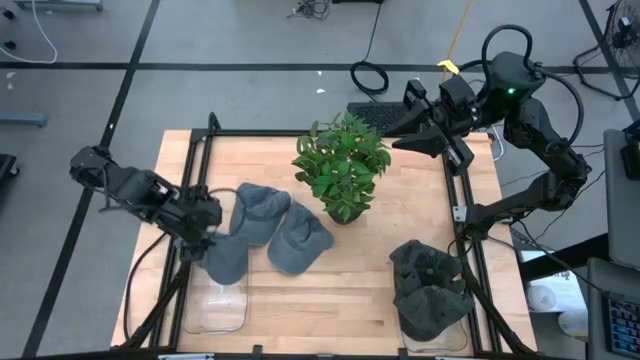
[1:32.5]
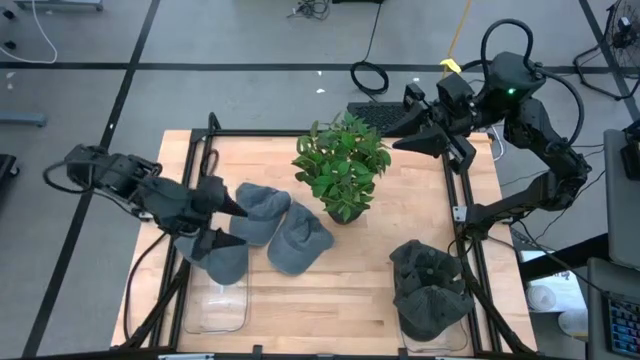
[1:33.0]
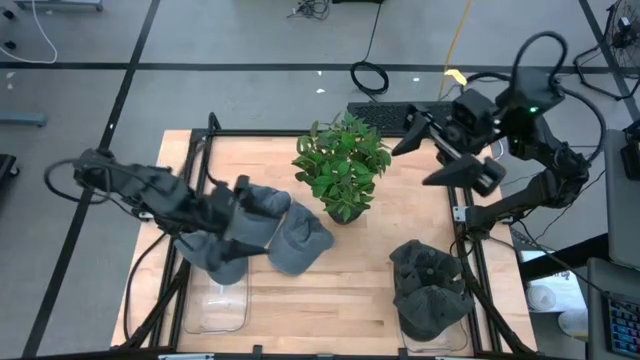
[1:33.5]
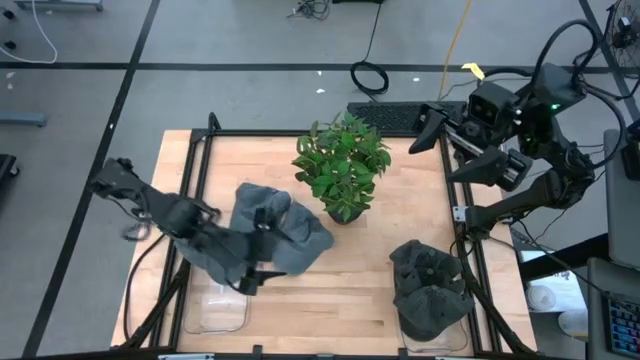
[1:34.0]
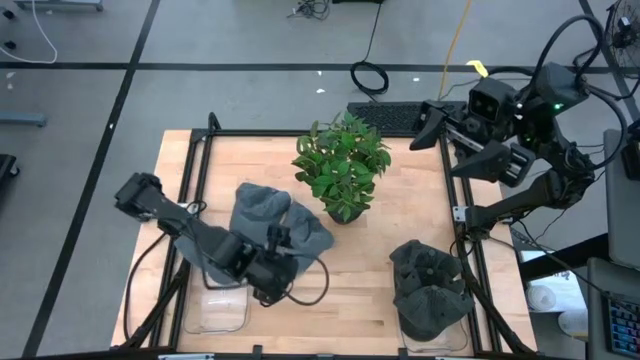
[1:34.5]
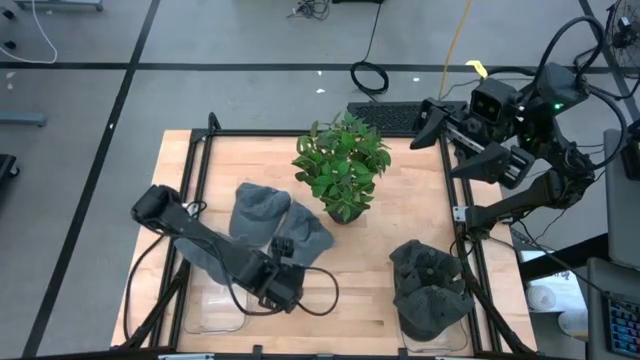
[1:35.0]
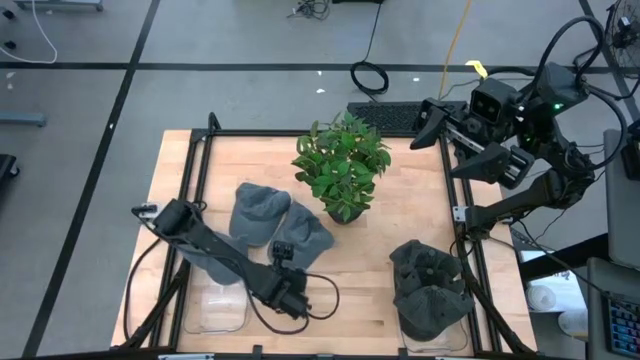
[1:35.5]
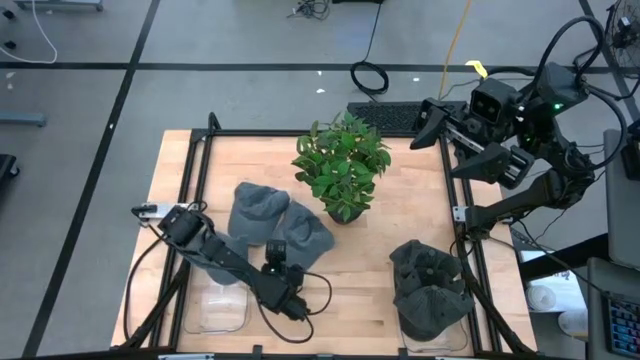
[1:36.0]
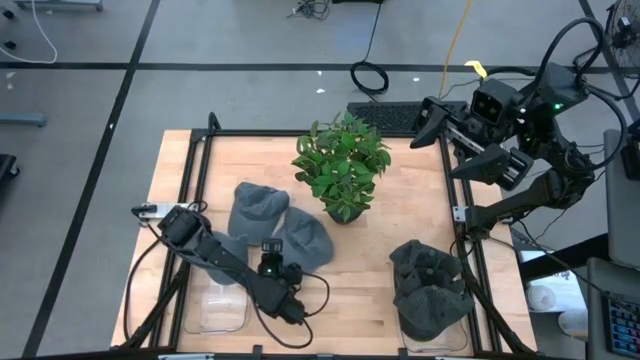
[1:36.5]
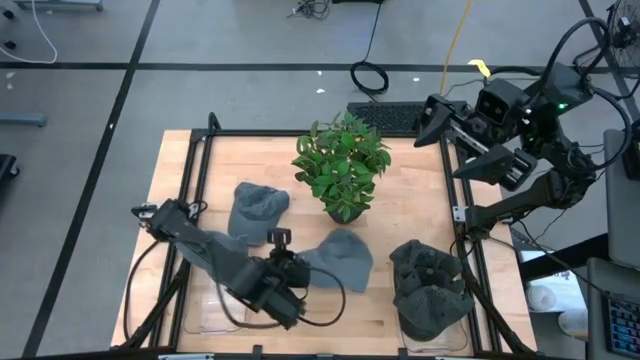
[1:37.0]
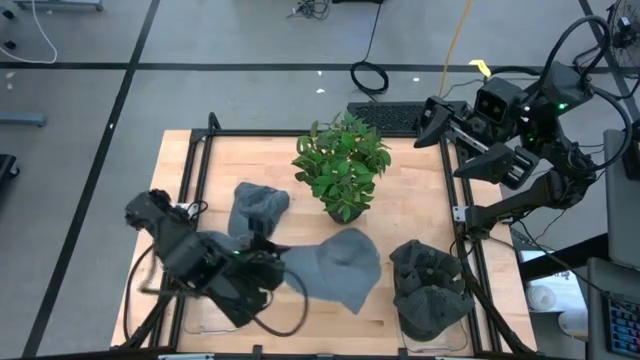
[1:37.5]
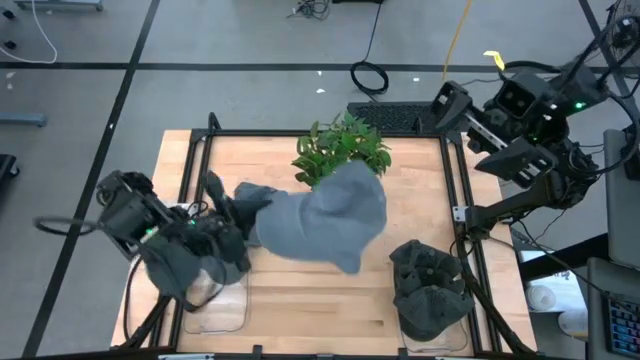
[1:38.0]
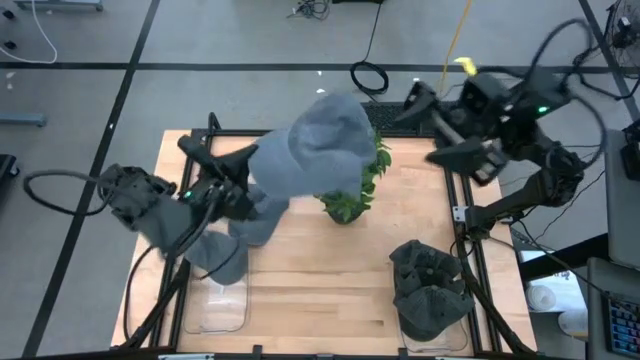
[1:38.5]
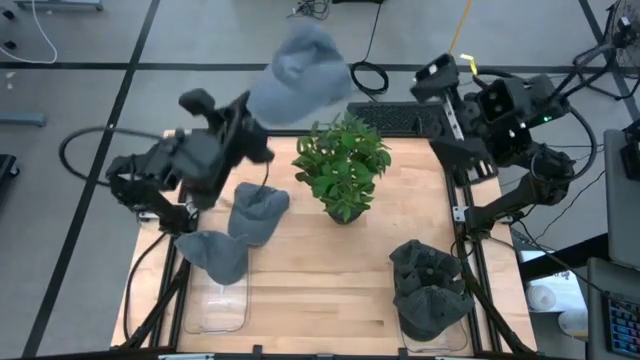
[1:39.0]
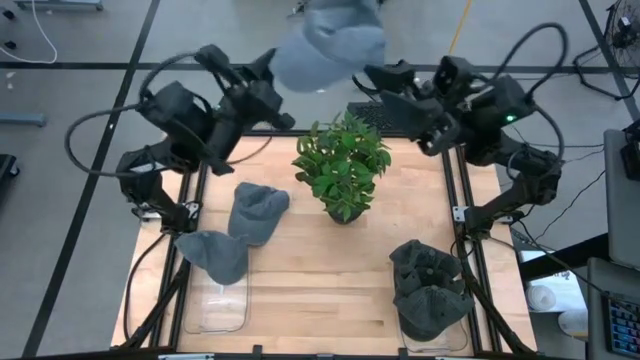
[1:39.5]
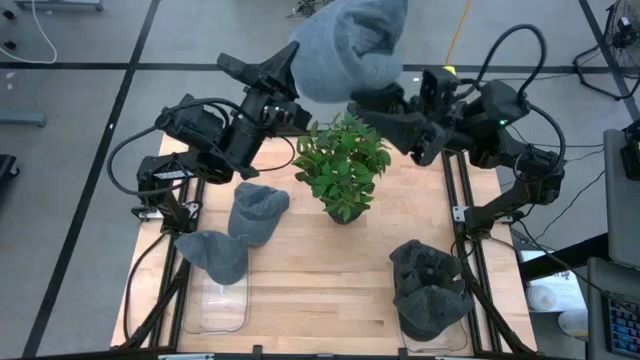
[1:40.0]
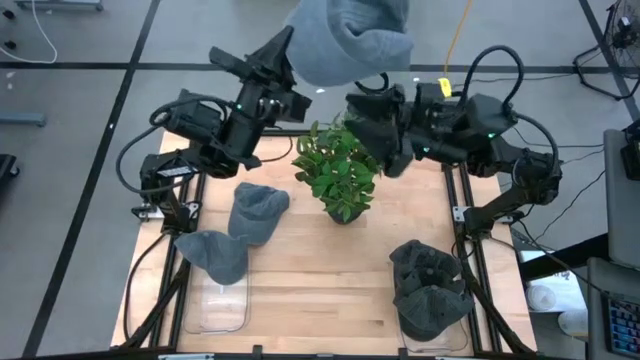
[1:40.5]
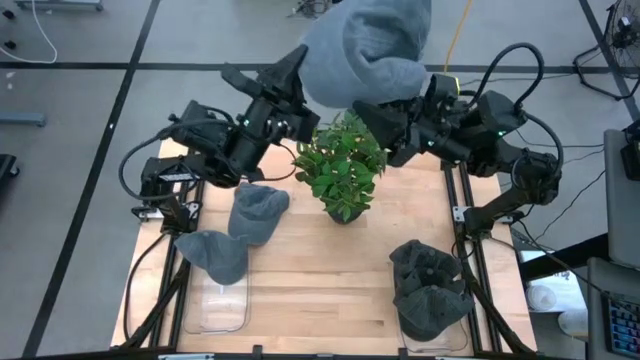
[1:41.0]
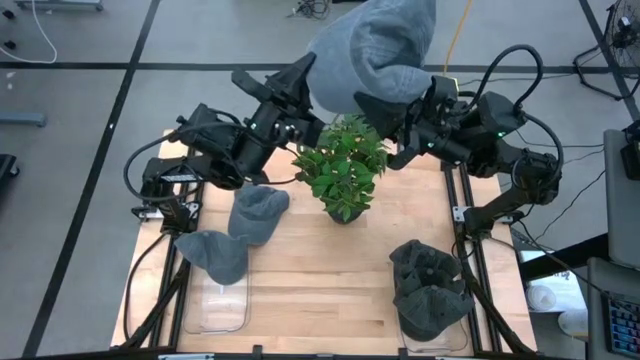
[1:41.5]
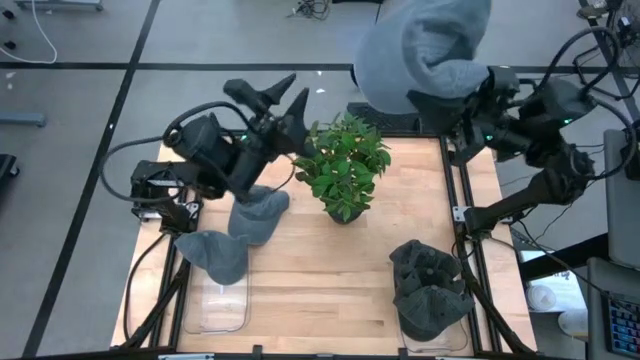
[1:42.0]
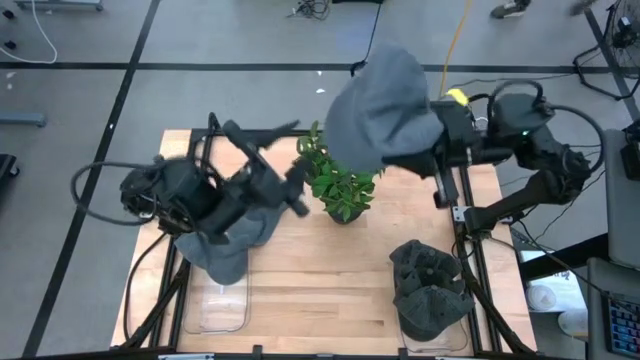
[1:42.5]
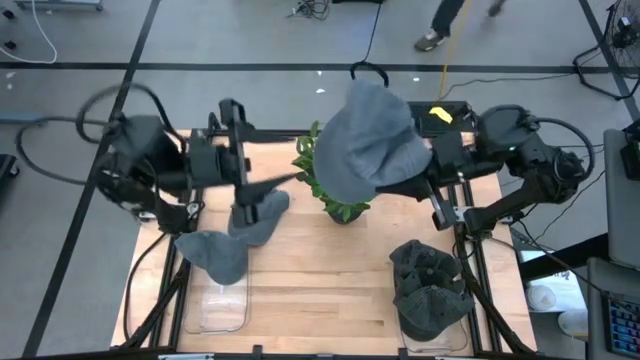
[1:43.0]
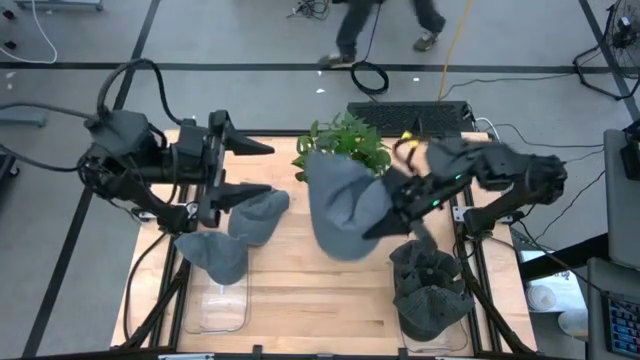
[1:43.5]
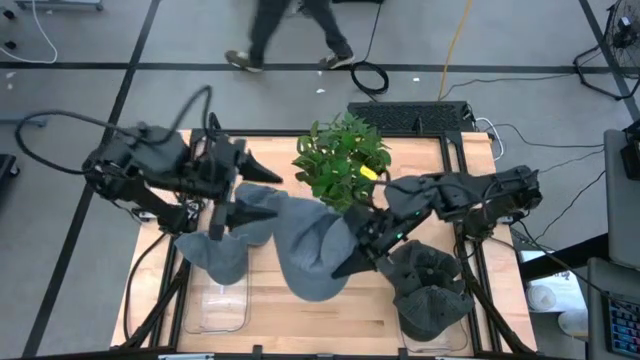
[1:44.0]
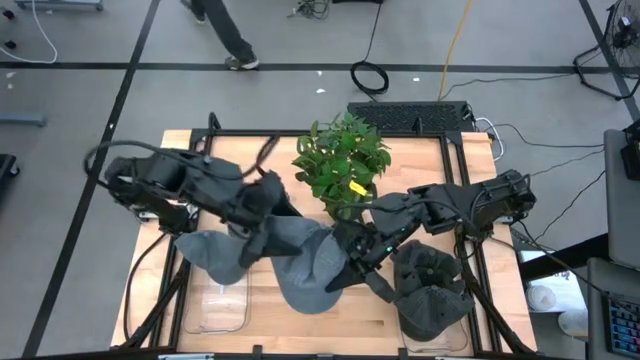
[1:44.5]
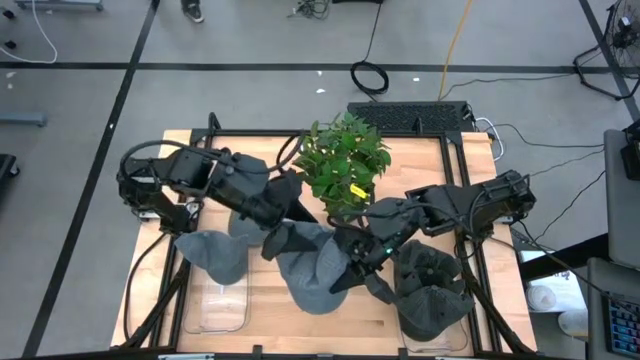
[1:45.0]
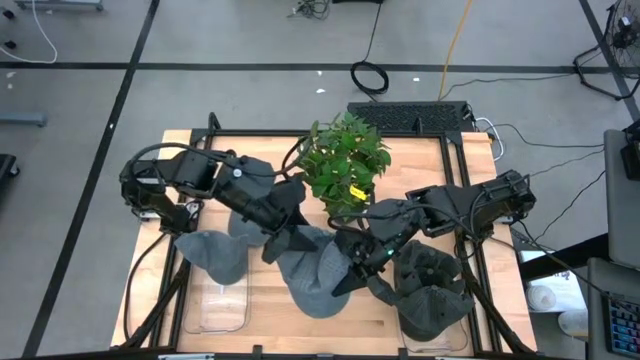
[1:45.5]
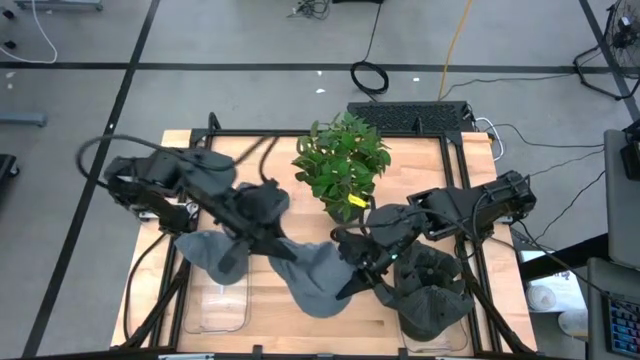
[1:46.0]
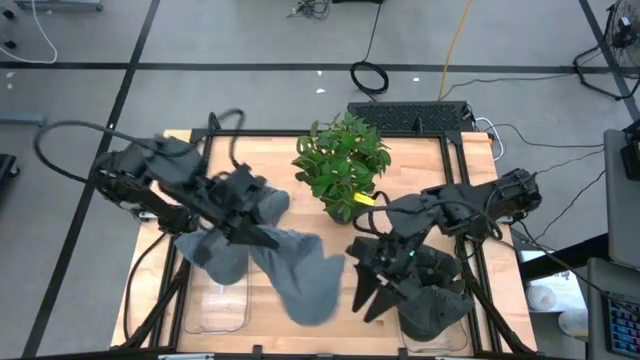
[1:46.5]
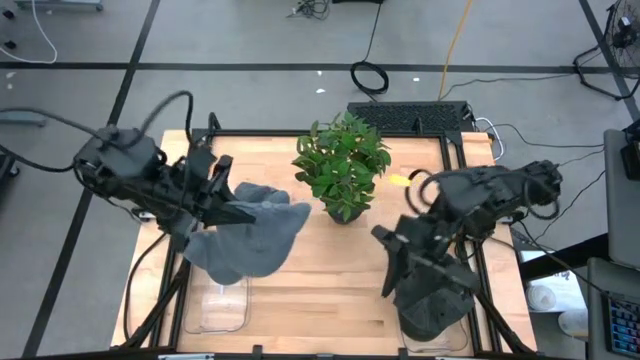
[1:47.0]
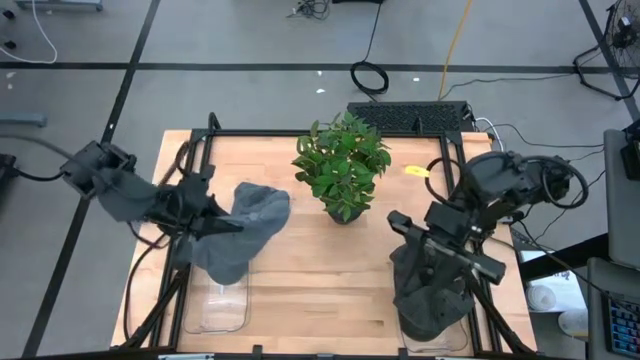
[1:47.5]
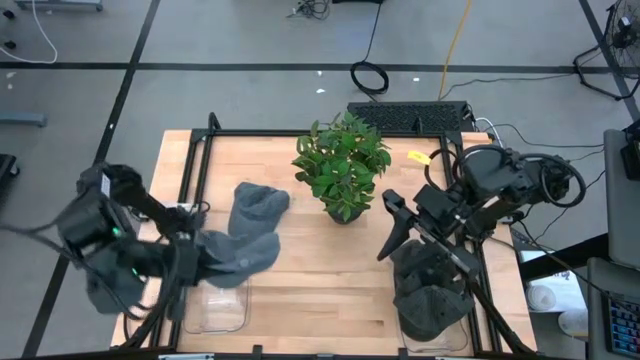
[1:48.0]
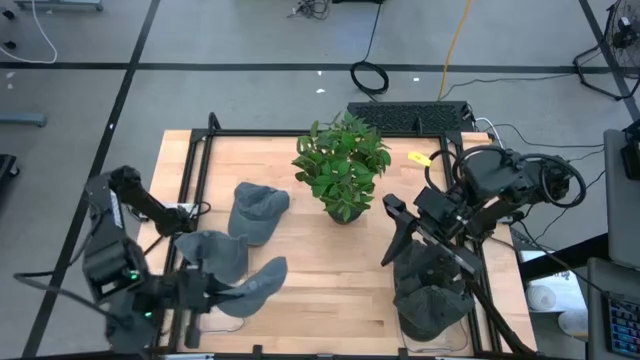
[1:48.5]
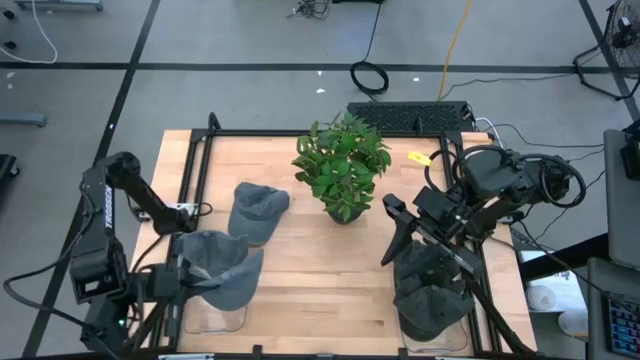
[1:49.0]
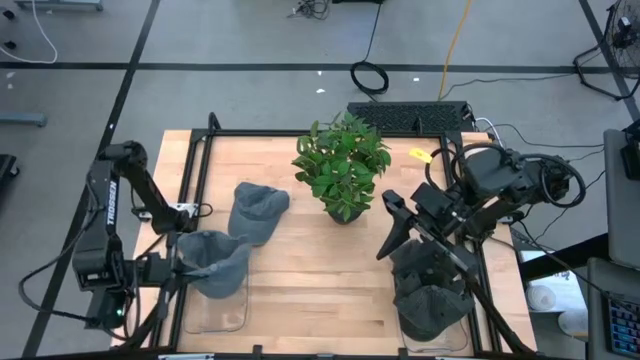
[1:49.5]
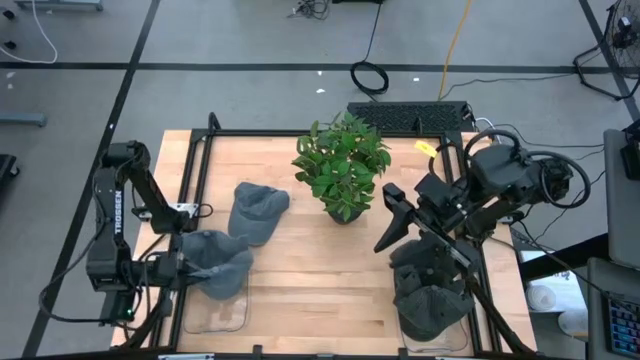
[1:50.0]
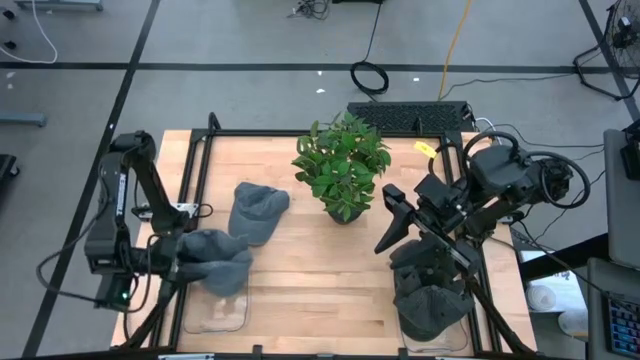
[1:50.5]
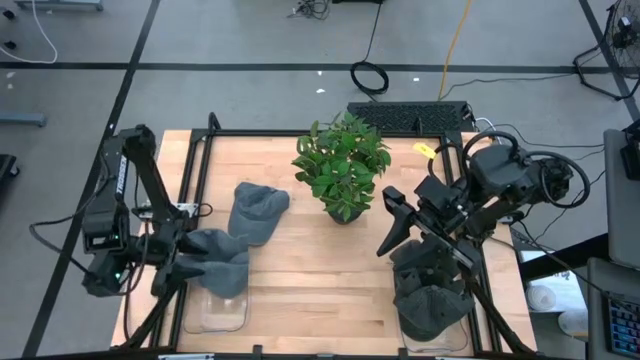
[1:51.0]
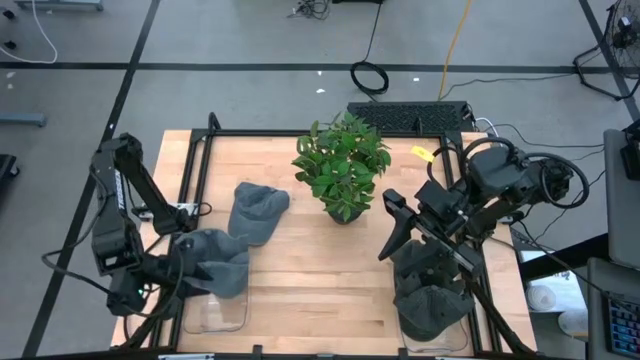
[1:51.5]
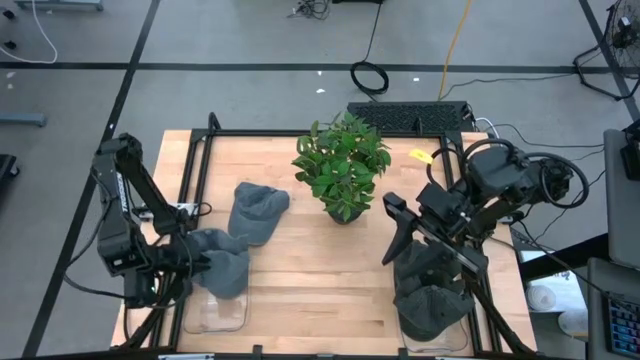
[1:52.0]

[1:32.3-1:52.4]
Task: Pick & Place hat
Put the right blue cap into the left transparent bin

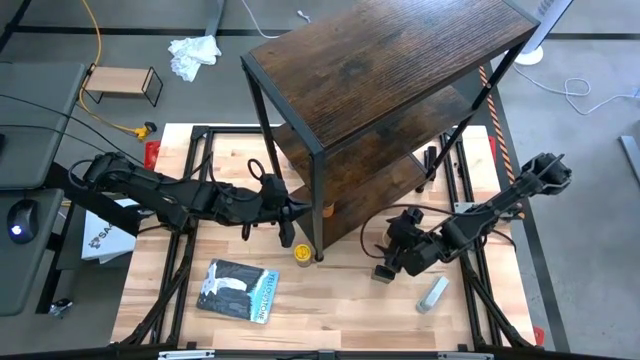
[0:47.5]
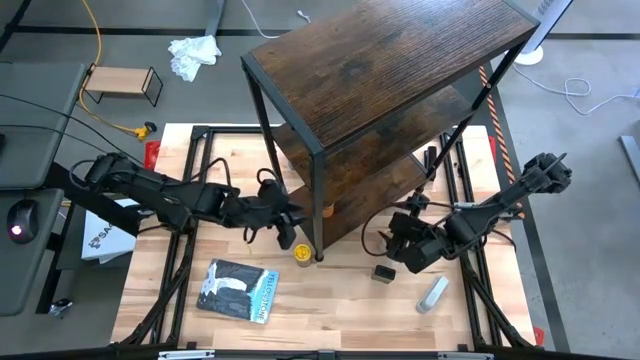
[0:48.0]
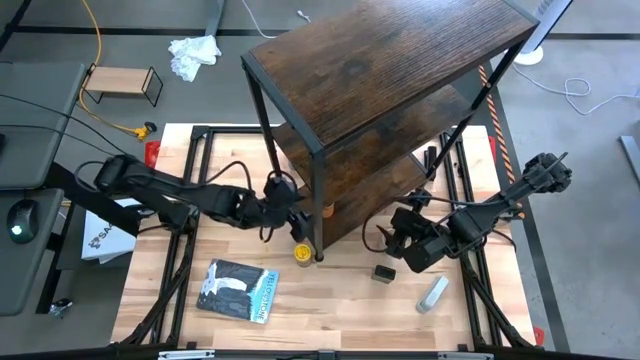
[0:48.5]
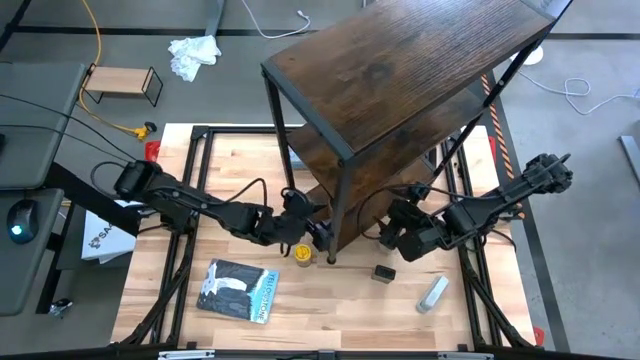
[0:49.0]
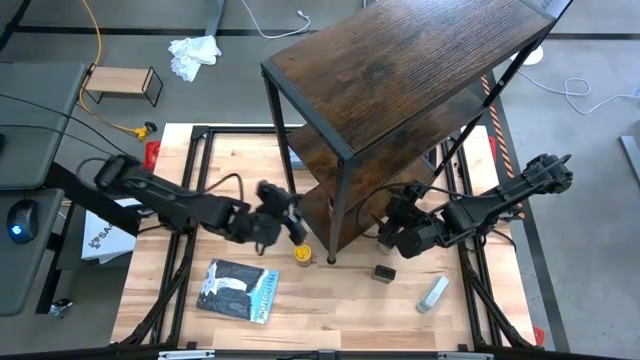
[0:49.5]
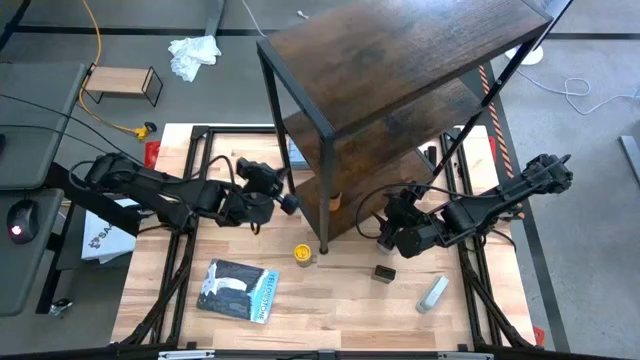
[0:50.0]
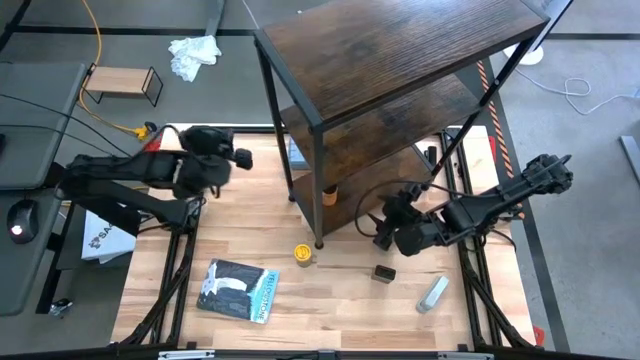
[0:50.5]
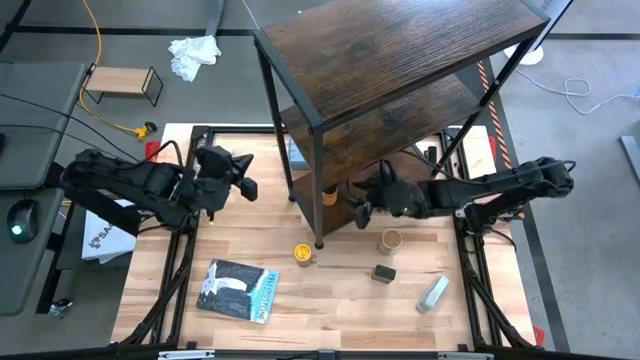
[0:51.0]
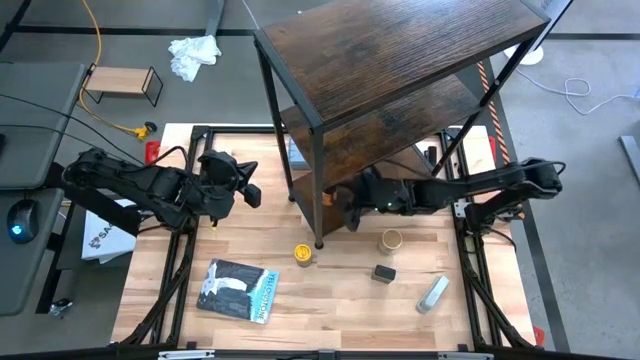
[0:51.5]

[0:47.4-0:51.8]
Task: Shelf spices
Remove the orange seasoning bottle from the shelf
